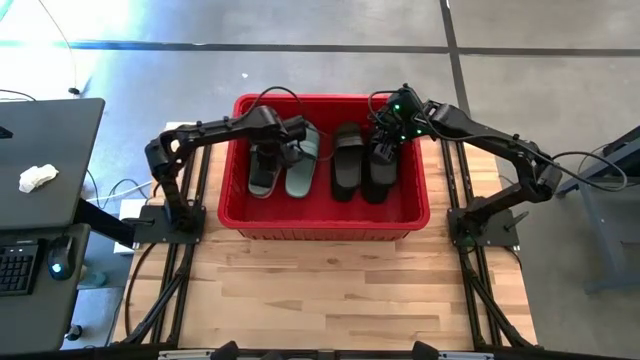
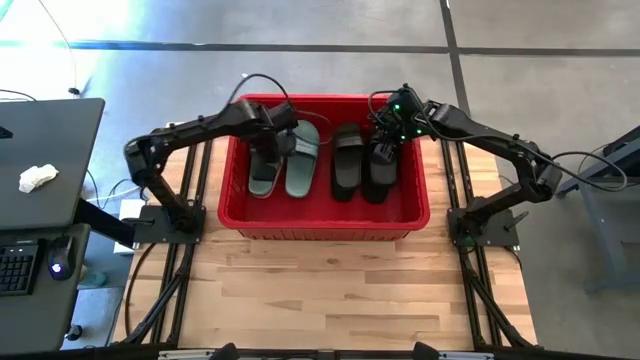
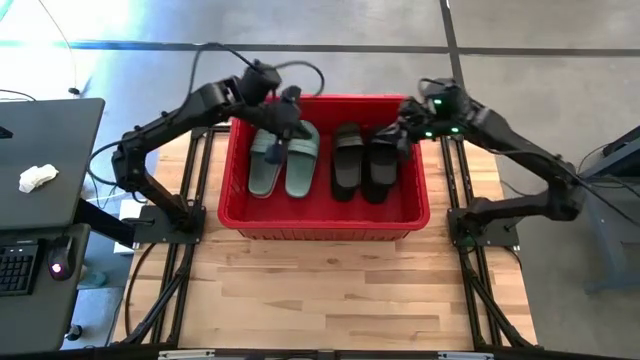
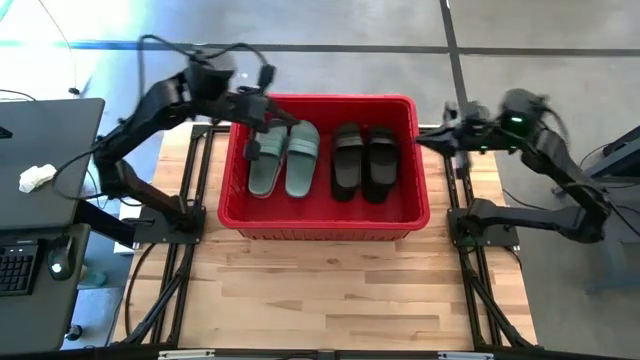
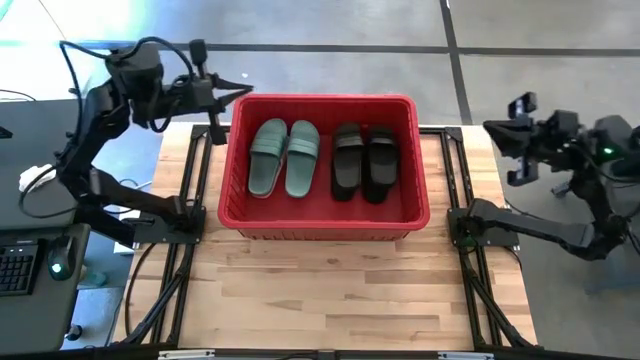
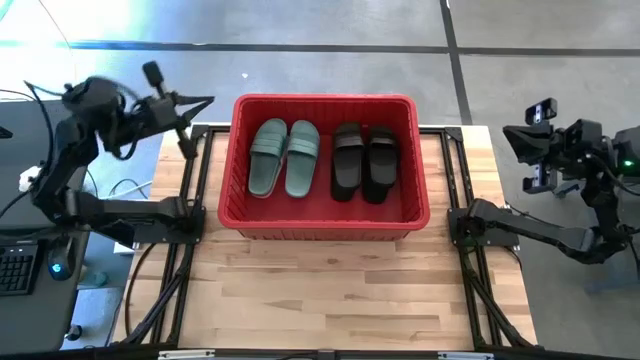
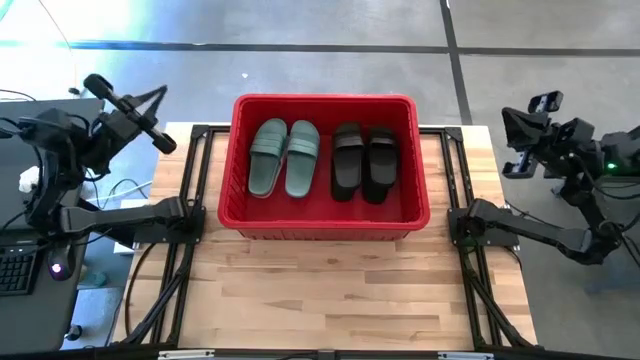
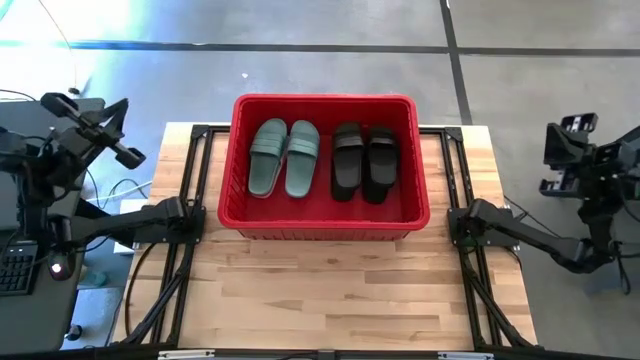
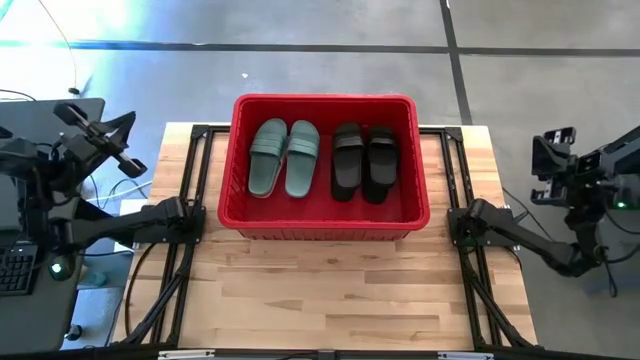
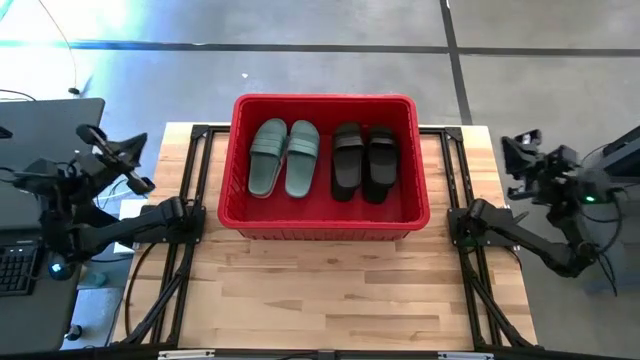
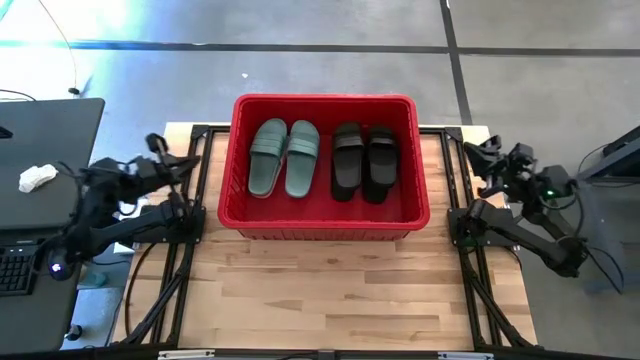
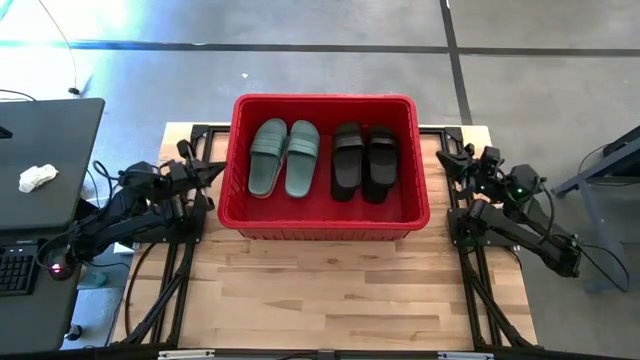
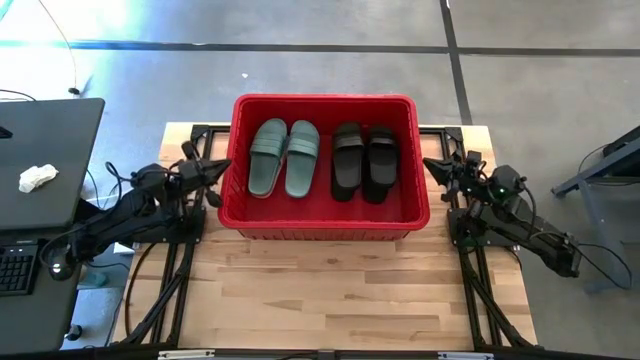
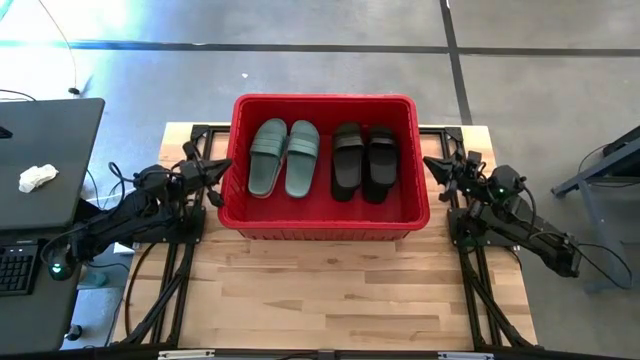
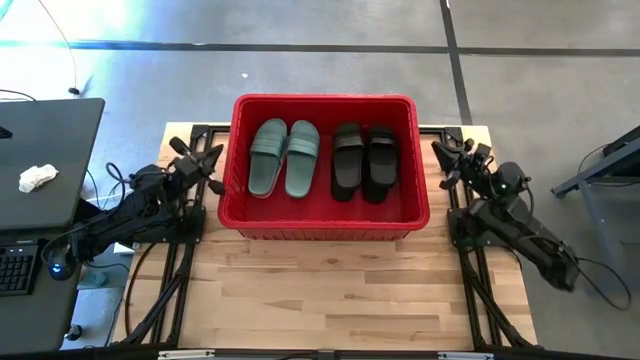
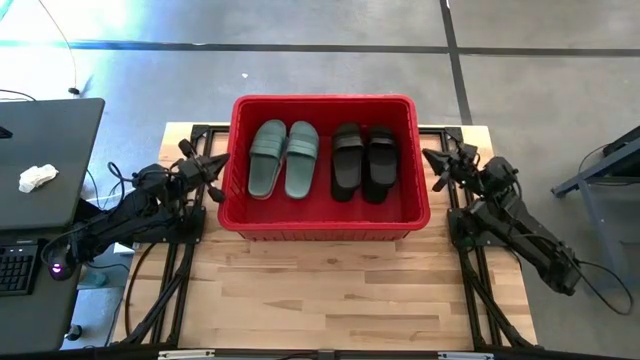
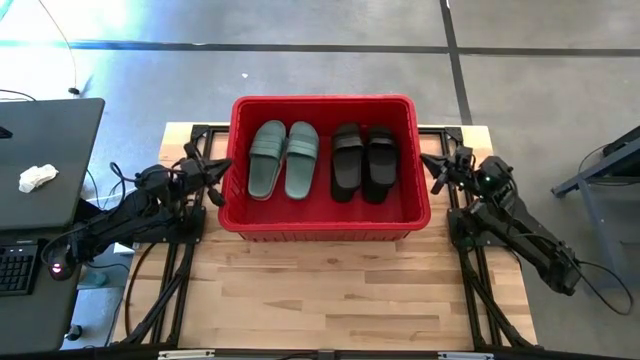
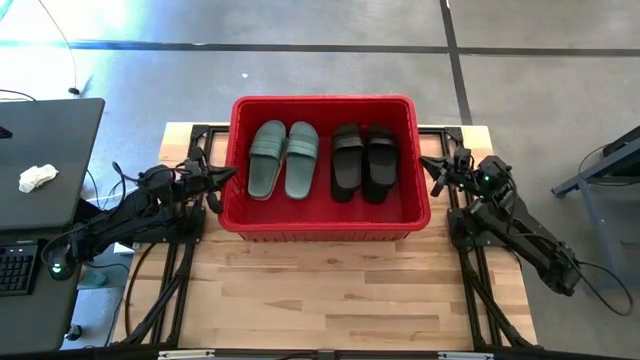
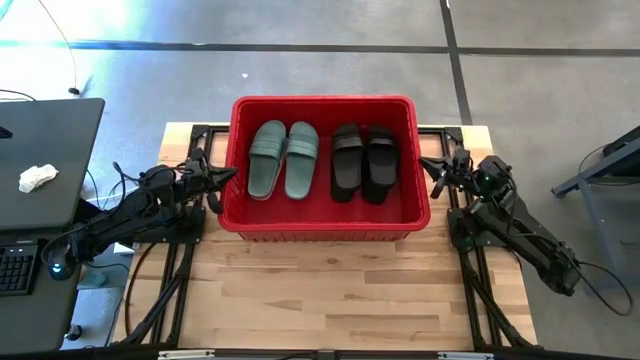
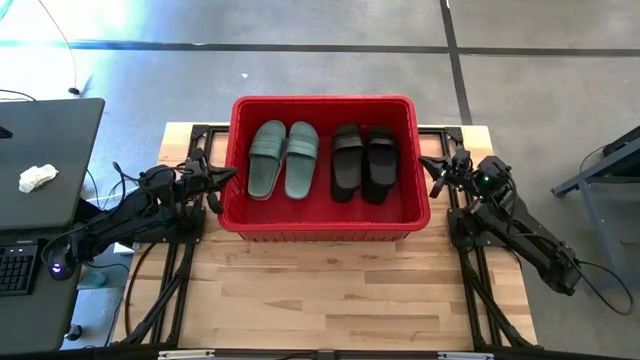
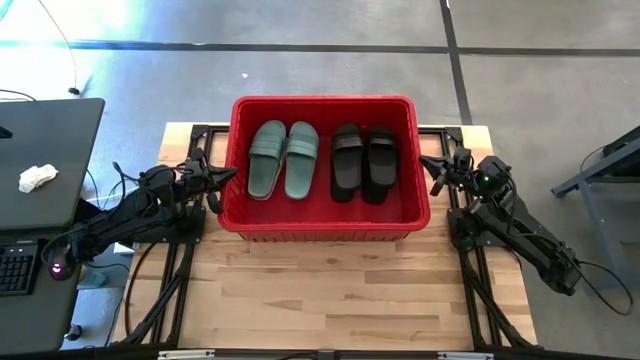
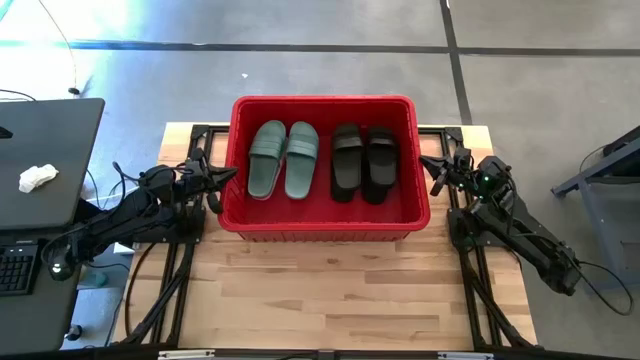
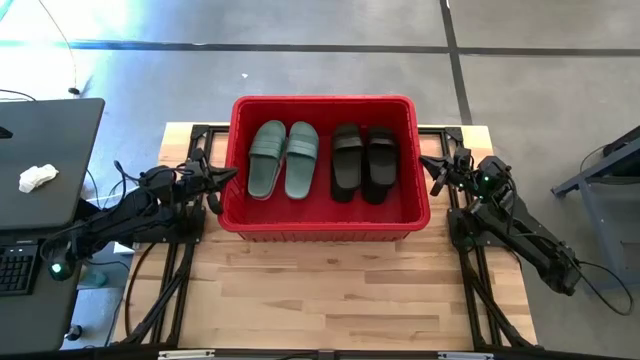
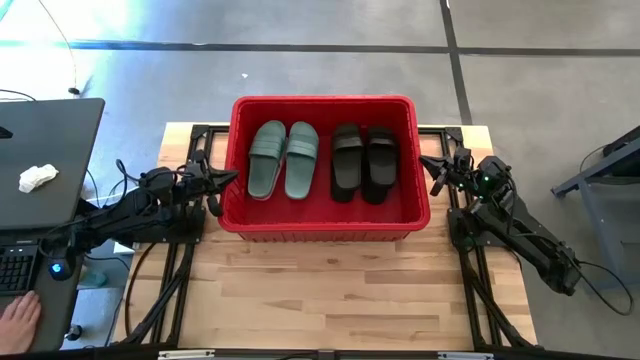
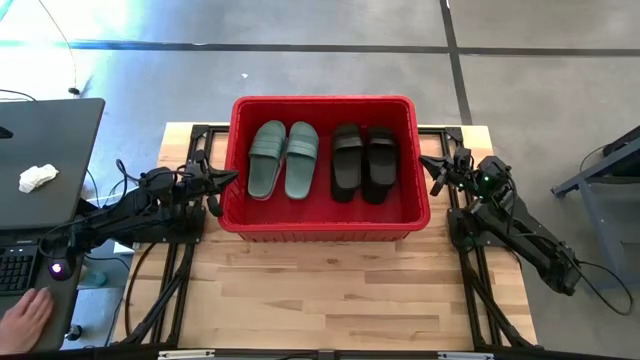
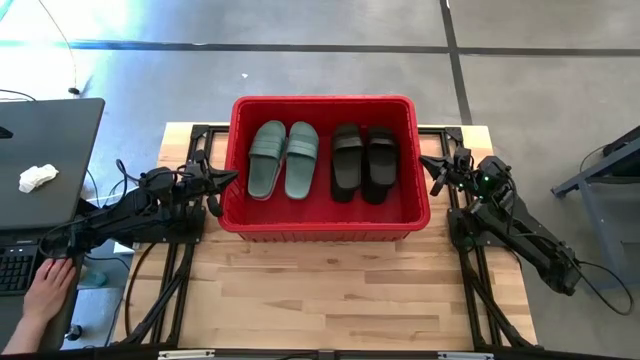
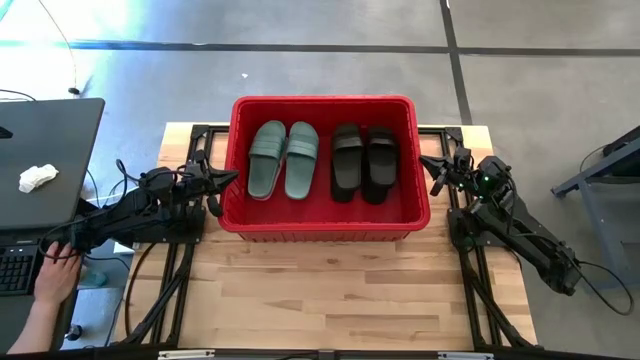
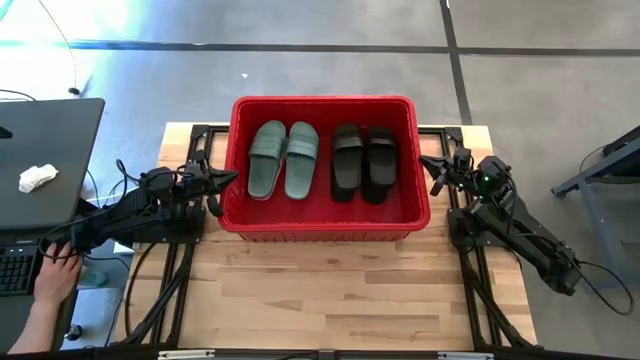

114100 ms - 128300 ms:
Task: Pick and place slides into bin
Return to Home Position

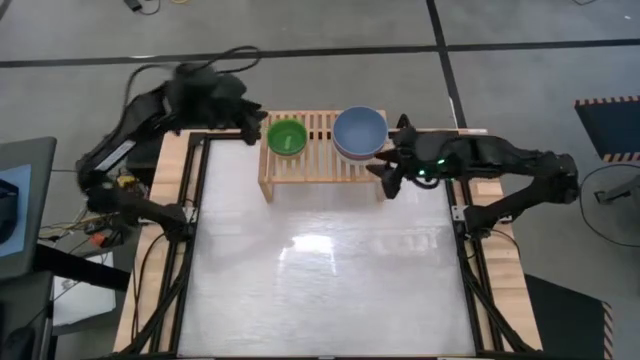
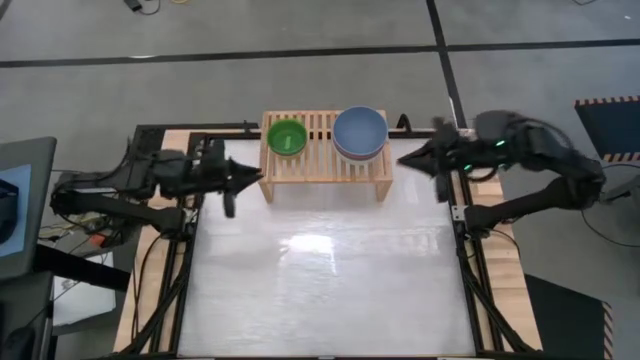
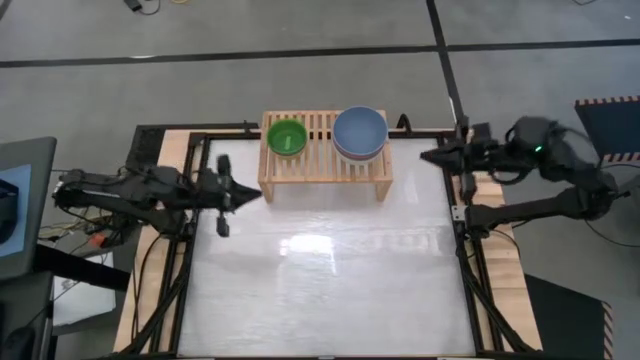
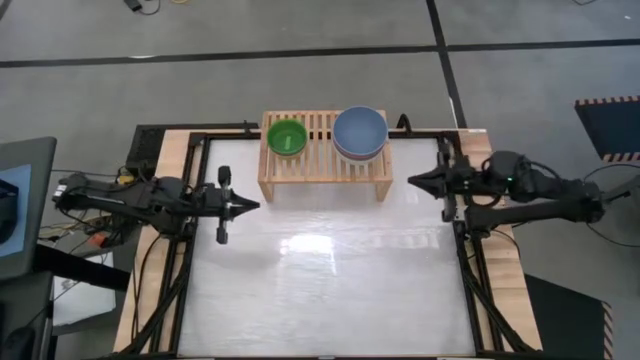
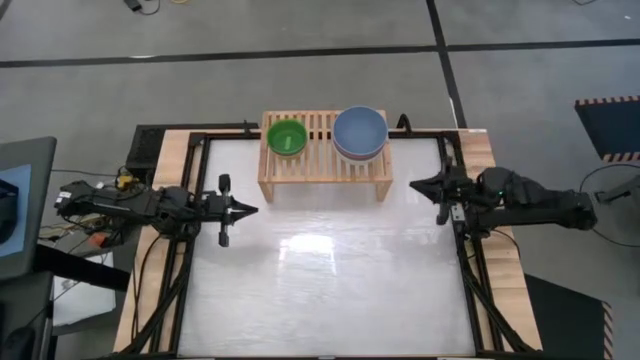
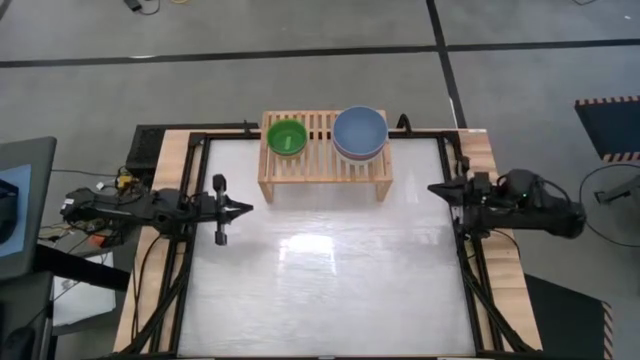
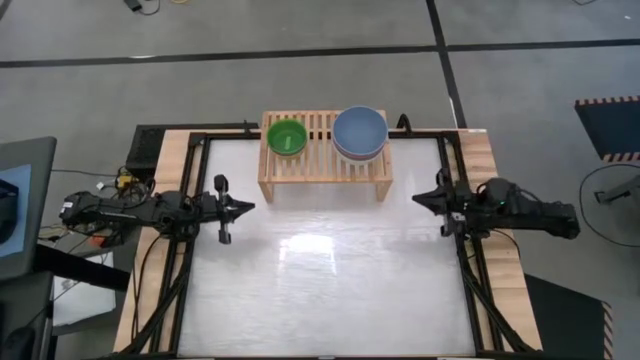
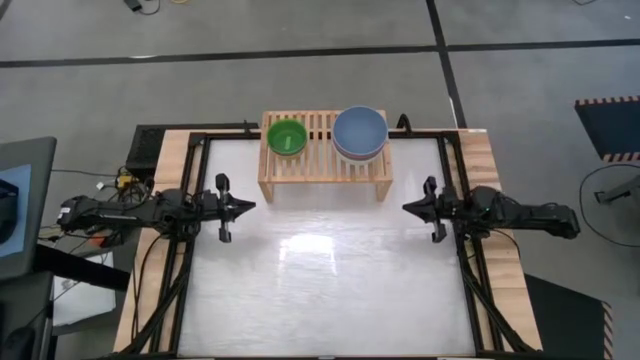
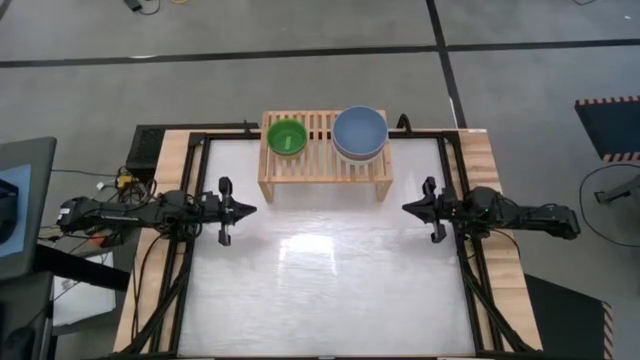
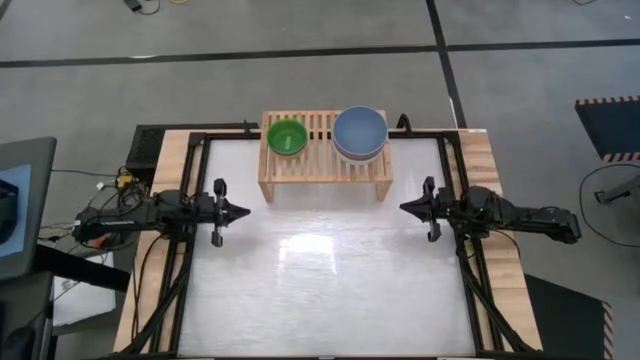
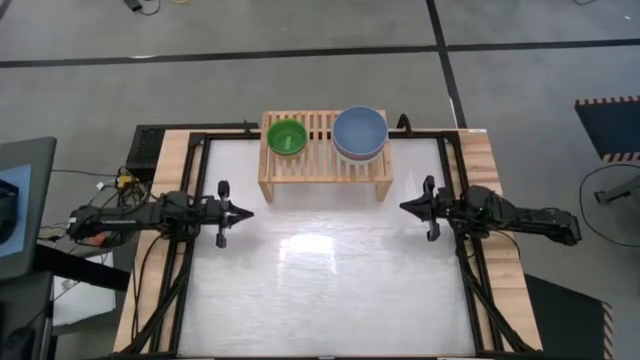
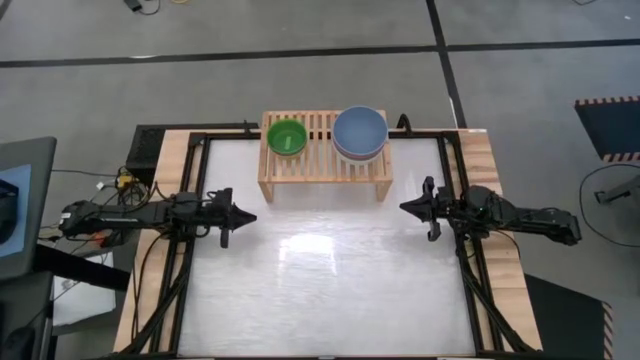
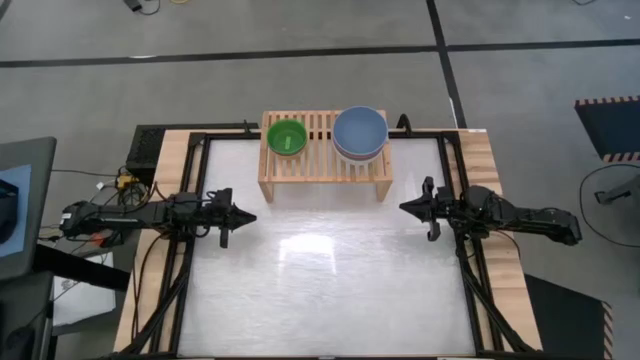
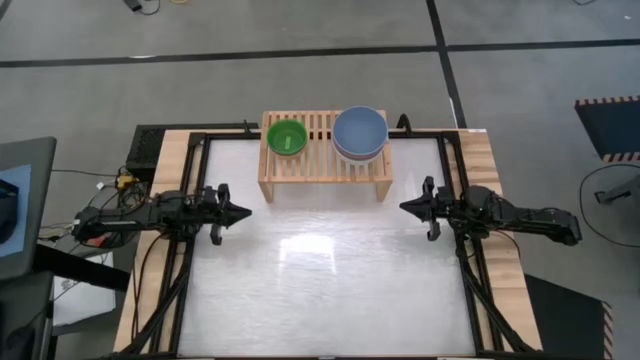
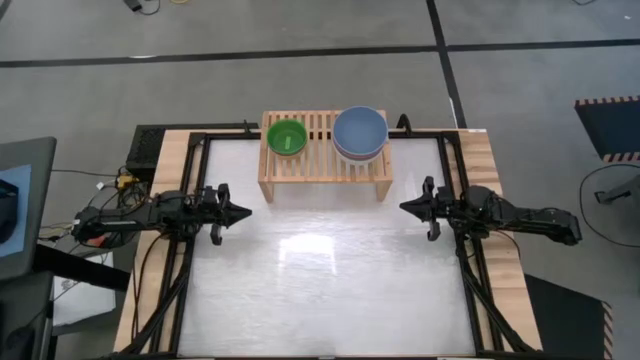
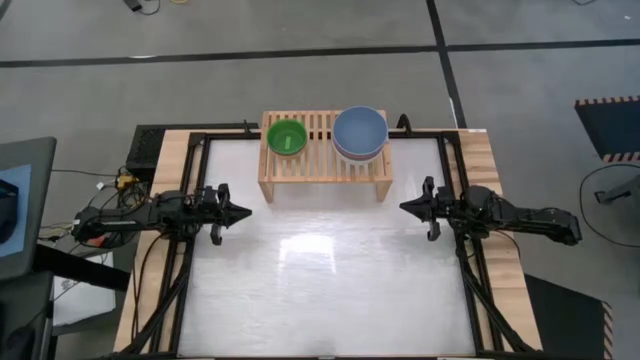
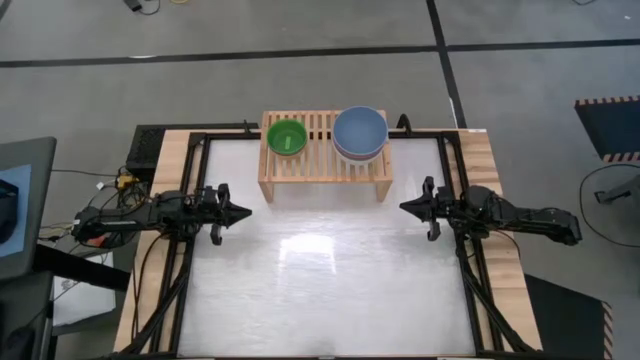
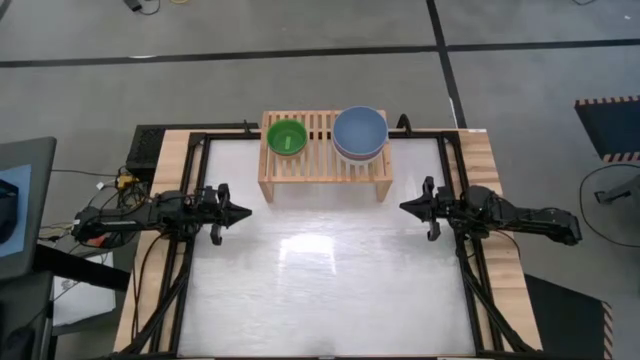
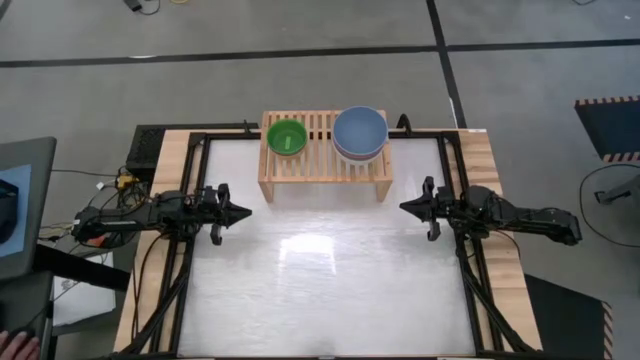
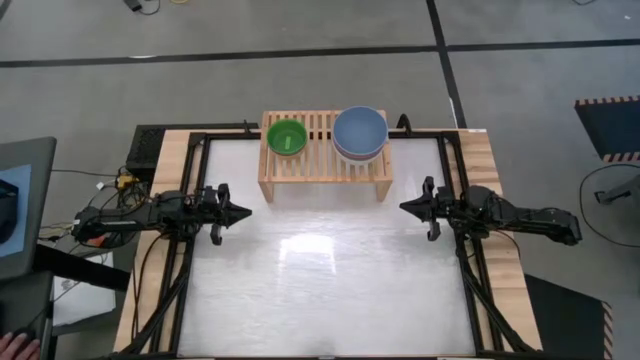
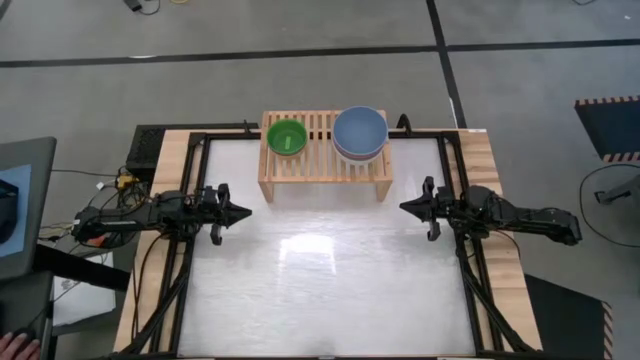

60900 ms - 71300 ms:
Task: Place and stack bowls onto a shelf
Return to Home Position
